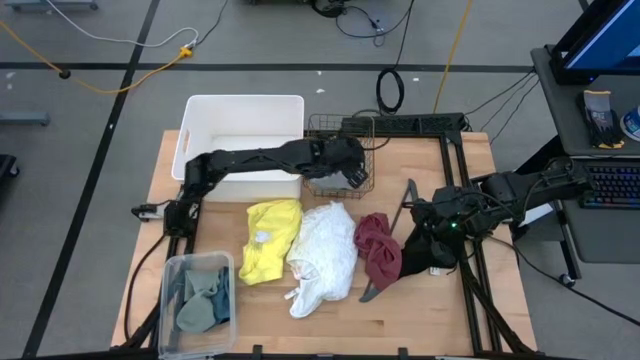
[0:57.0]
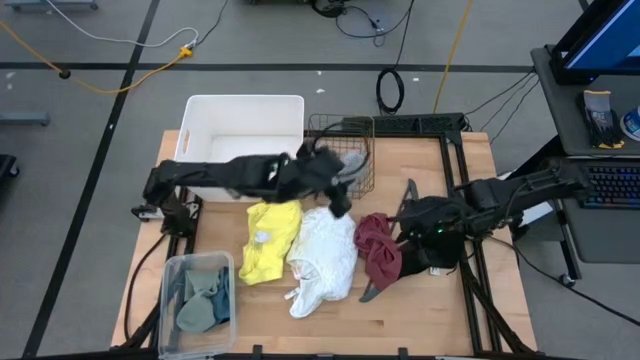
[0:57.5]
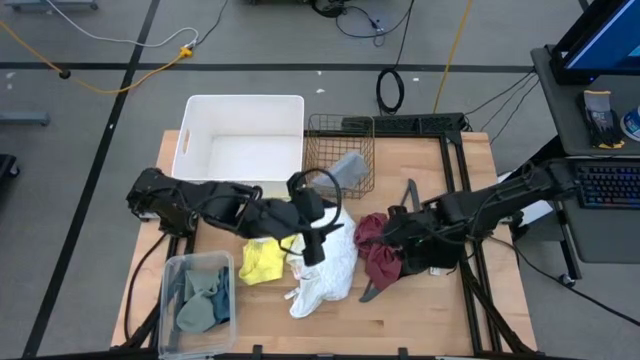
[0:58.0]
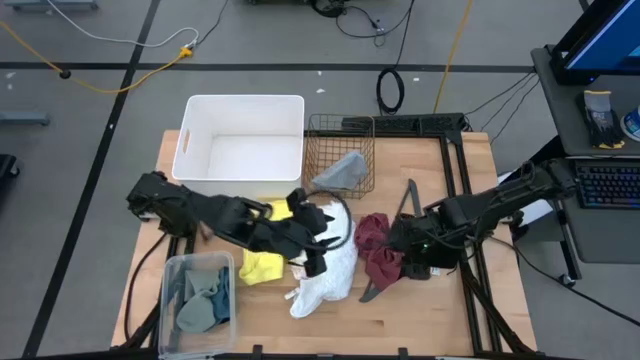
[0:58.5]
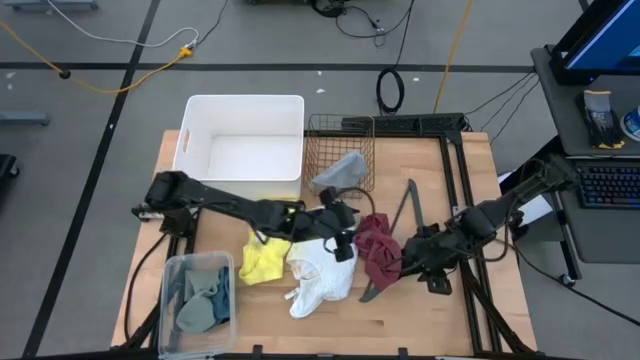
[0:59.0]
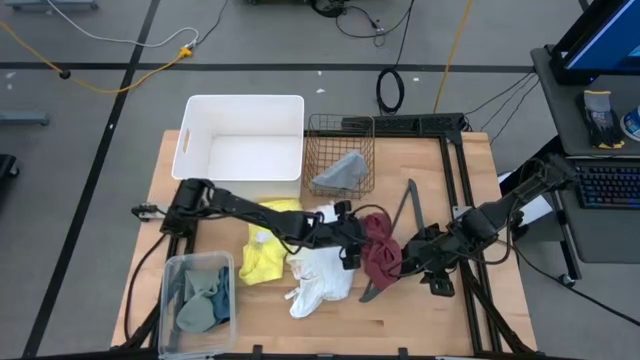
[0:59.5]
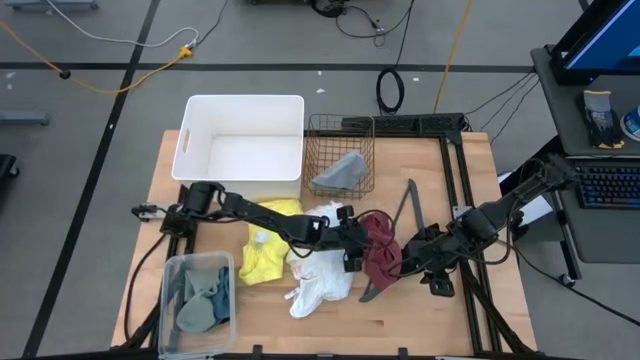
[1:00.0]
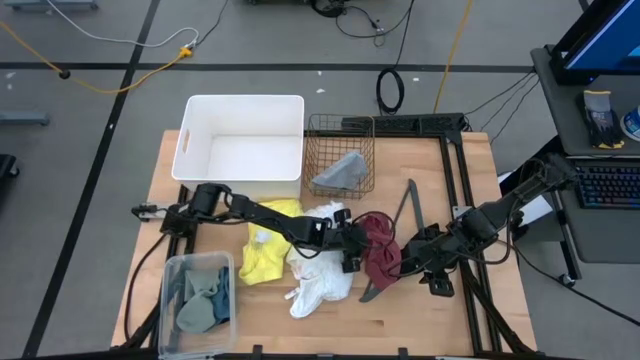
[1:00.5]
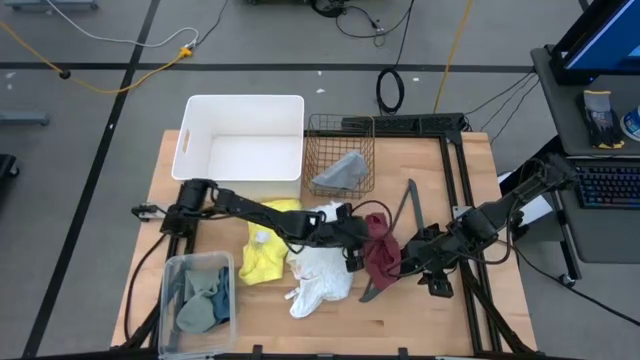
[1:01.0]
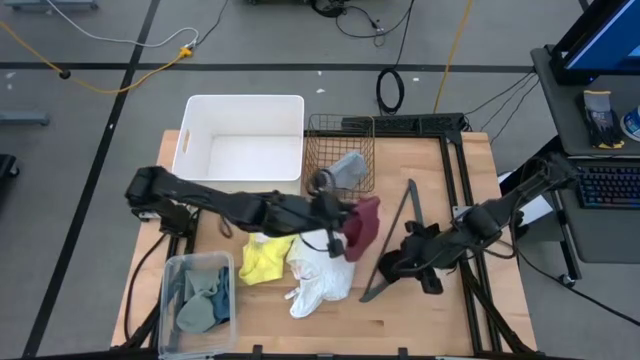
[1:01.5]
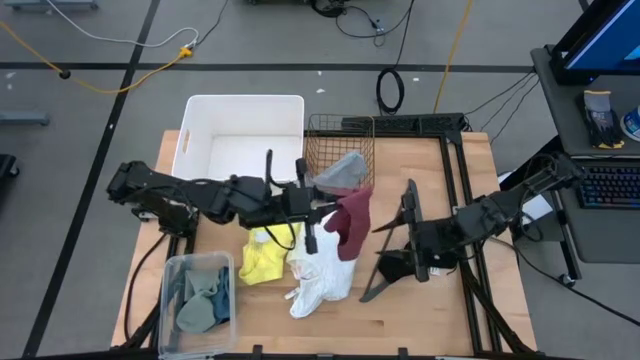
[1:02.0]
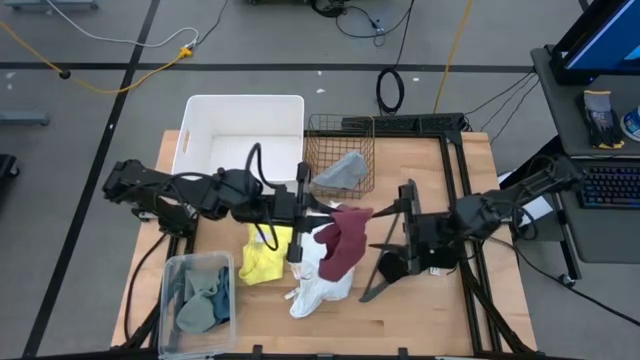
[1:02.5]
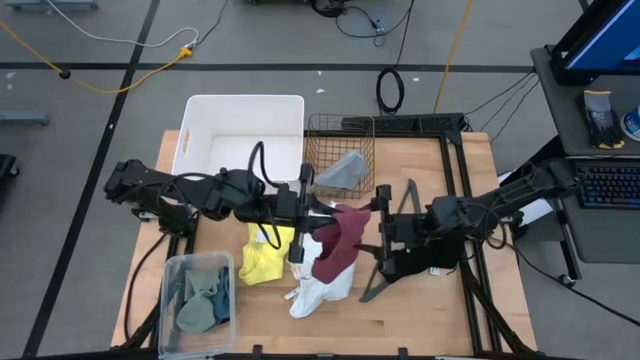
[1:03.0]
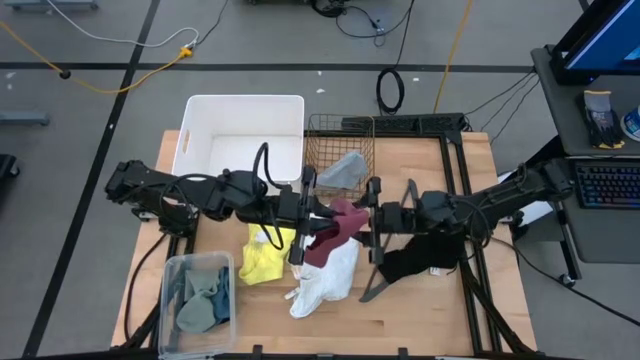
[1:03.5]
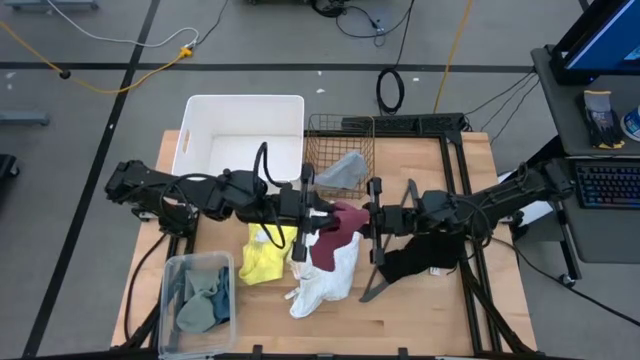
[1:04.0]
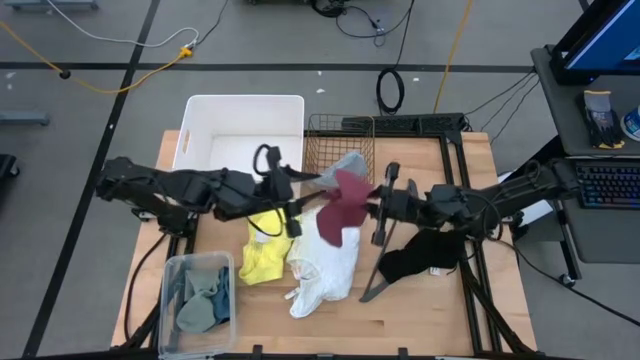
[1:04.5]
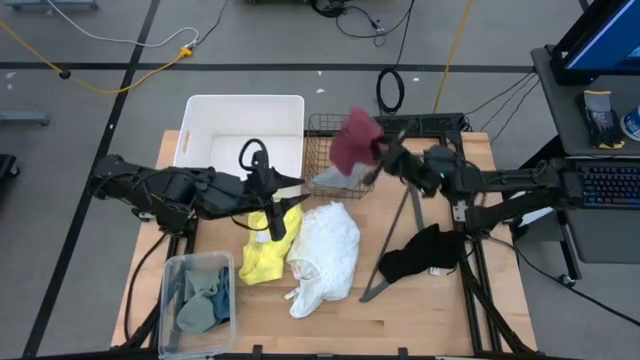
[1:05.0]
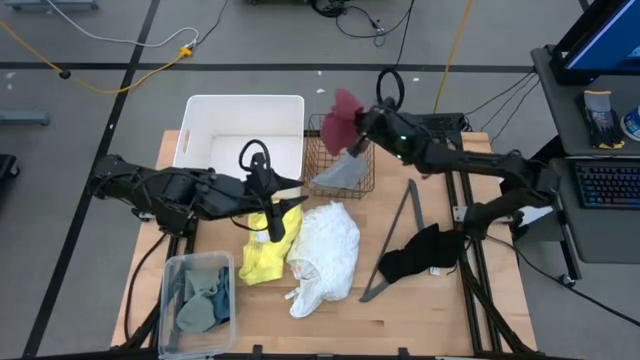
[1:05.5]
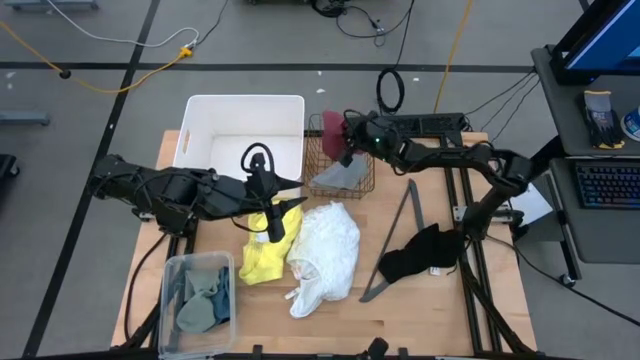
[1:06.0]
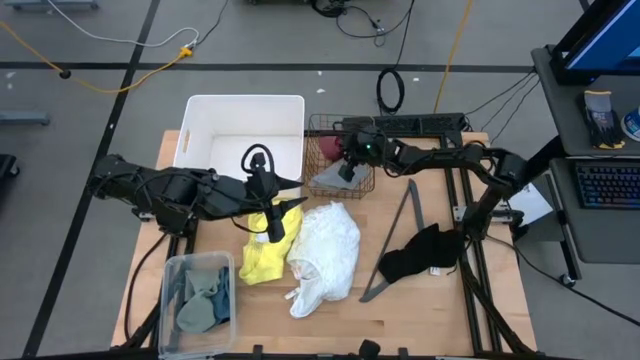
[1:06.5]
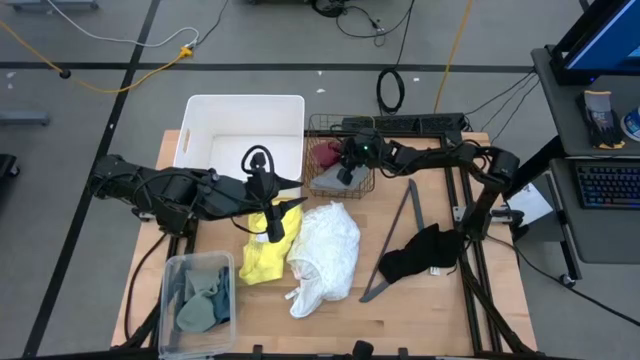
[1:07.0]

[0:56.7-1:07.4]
Task: Pick & Place Cloths
Put the pink boxer into the gold wire basket

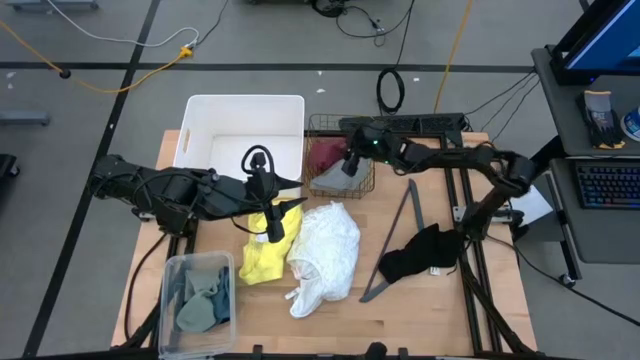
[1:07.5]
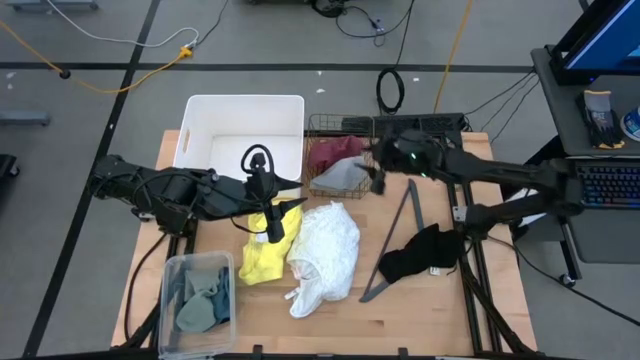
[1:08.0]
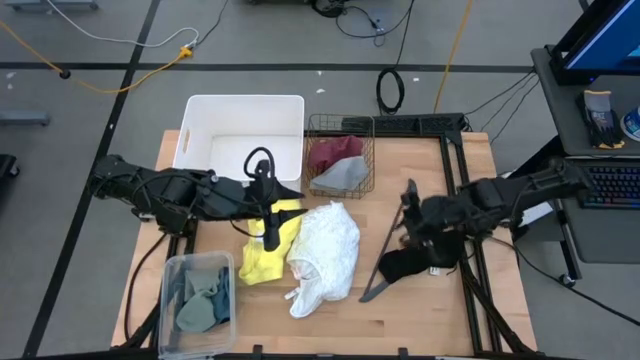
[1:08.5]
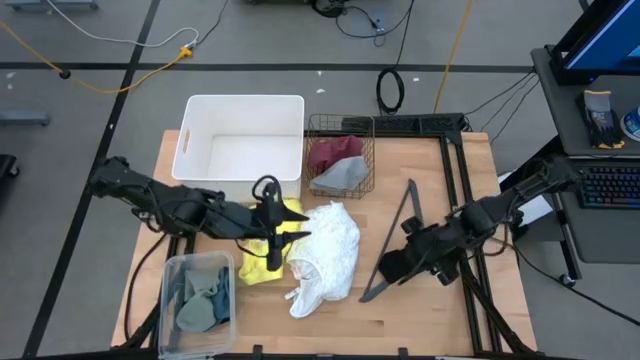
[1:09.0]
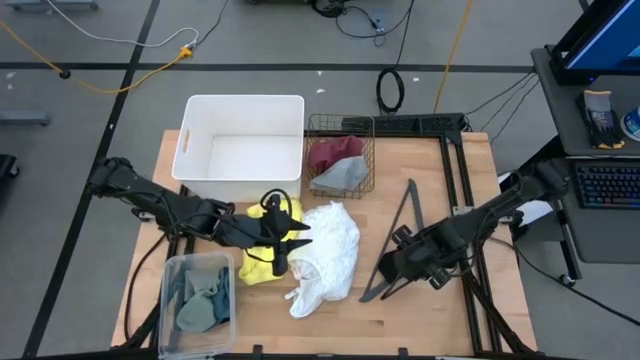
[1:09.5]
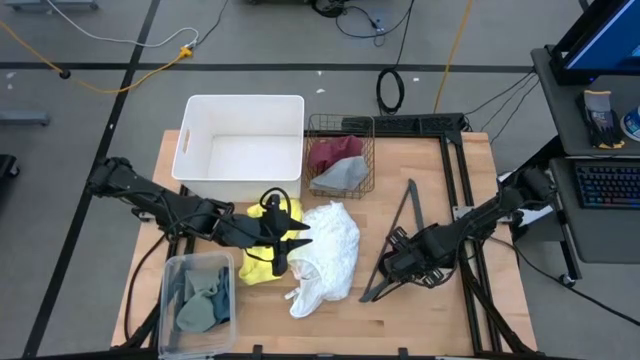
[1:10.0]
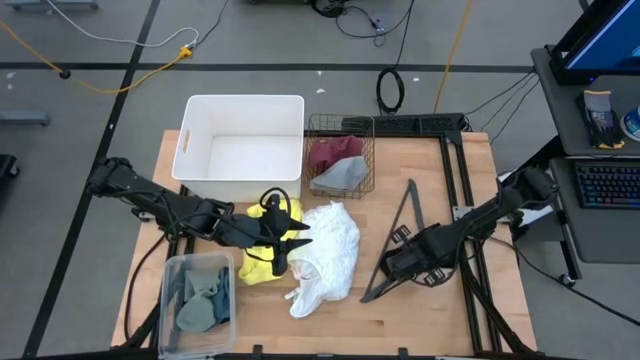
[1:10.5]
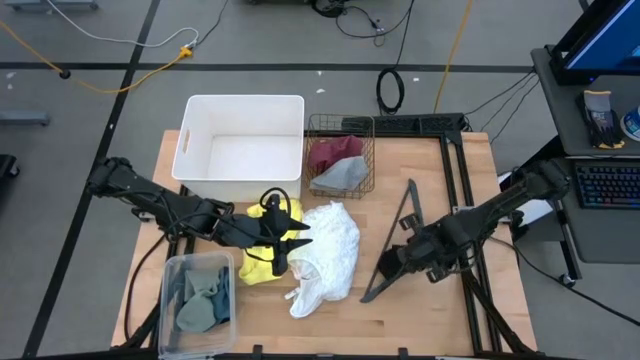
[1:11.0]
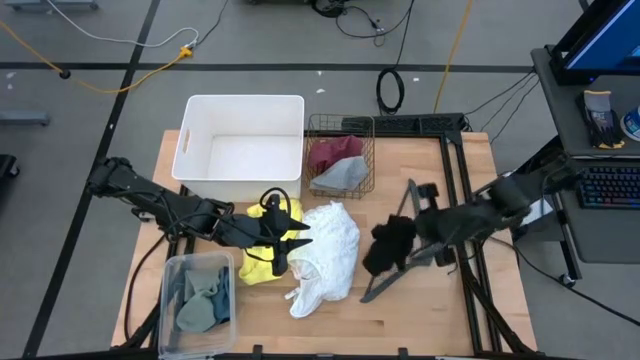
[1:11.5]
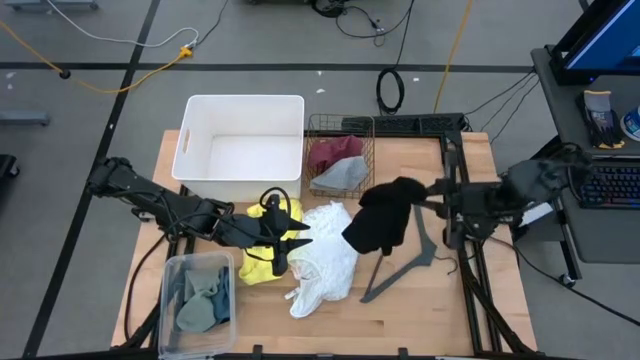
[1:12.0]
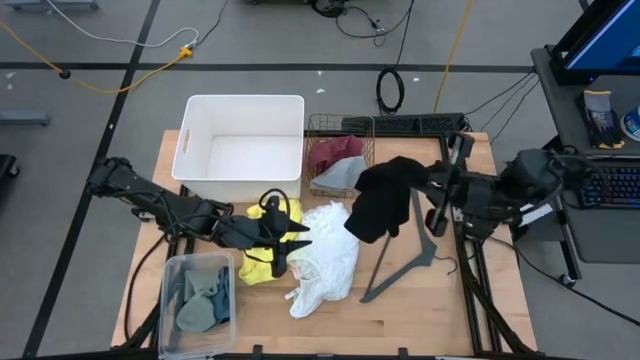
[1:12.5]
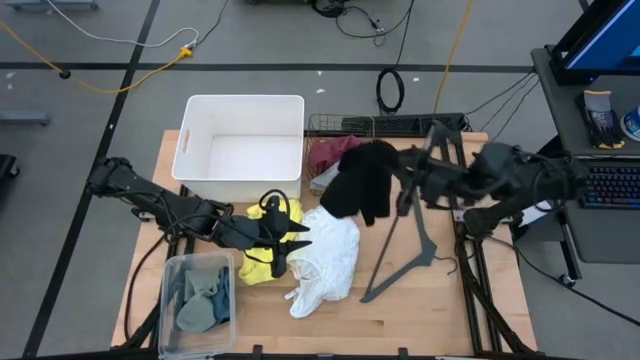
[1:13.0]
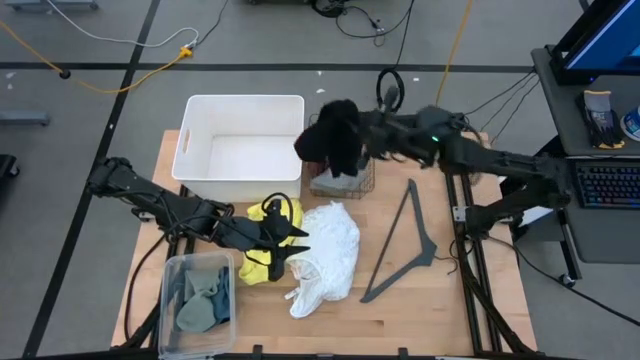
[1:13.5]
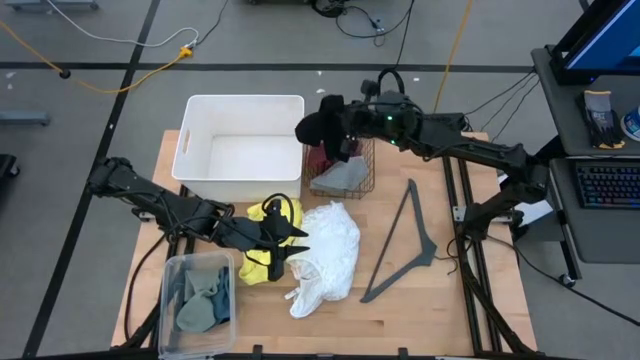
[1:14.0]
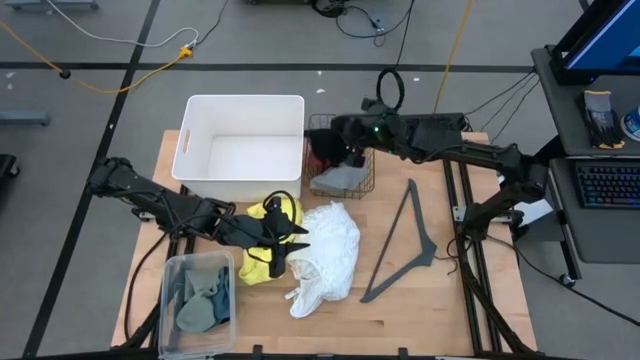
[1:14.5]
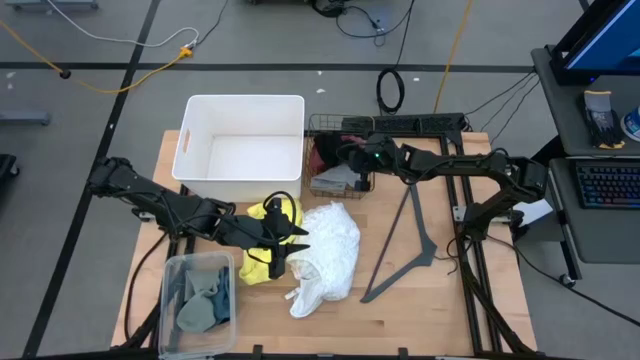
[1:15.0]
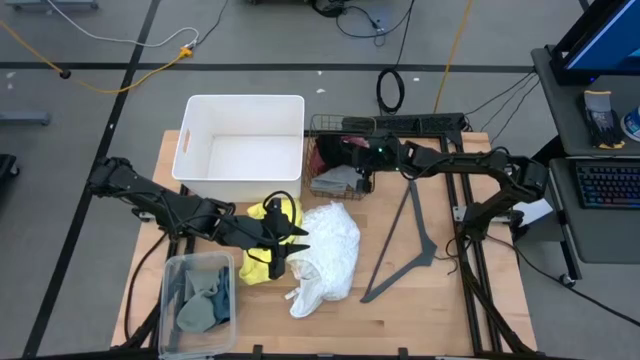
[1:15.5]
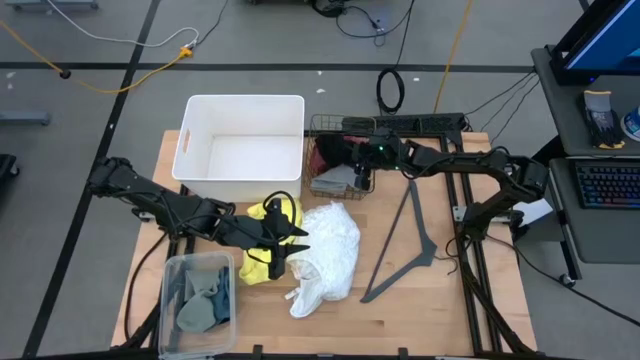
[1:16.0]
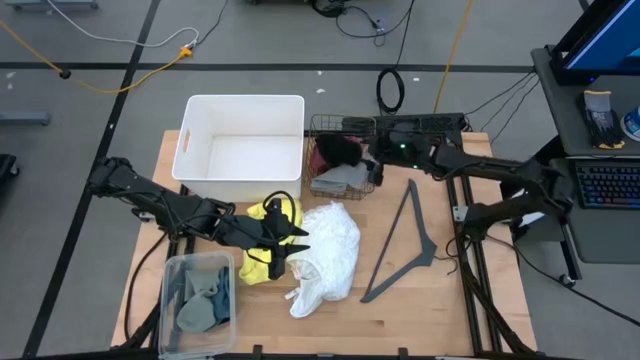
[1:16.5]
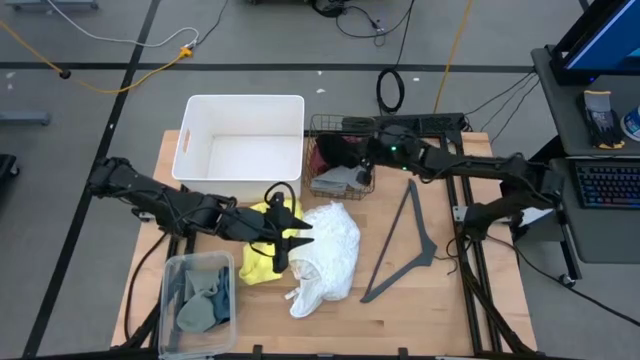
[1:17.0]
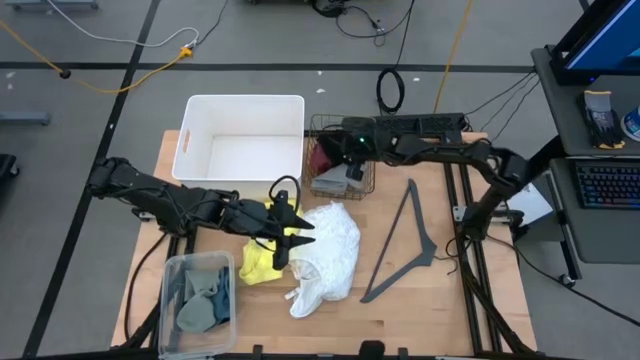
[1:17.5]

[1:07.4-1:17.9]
Put the black boxer into the gold wire basket

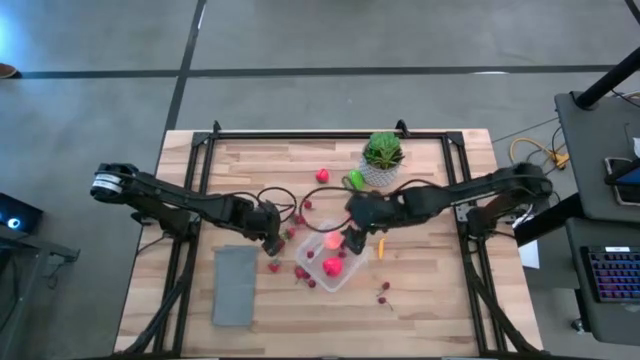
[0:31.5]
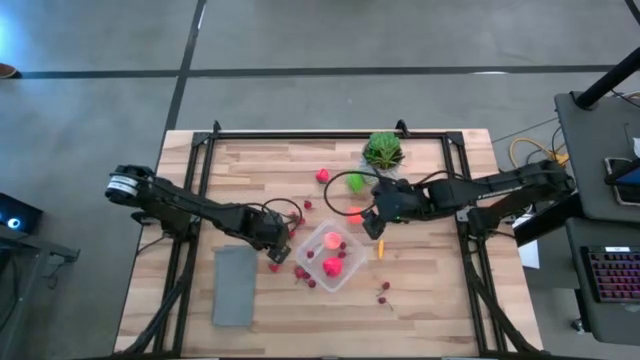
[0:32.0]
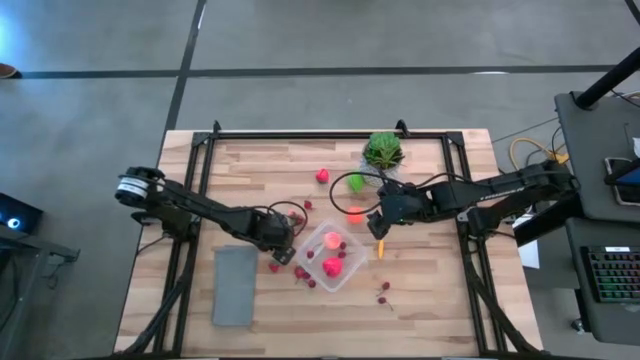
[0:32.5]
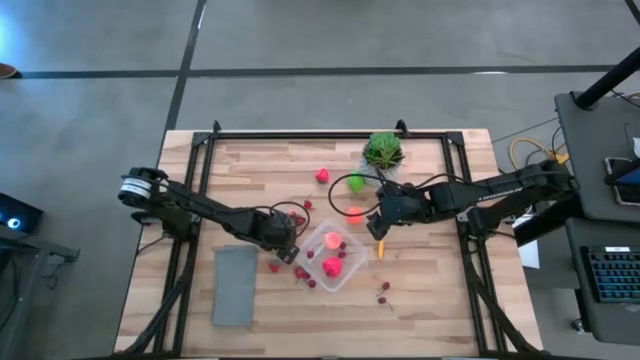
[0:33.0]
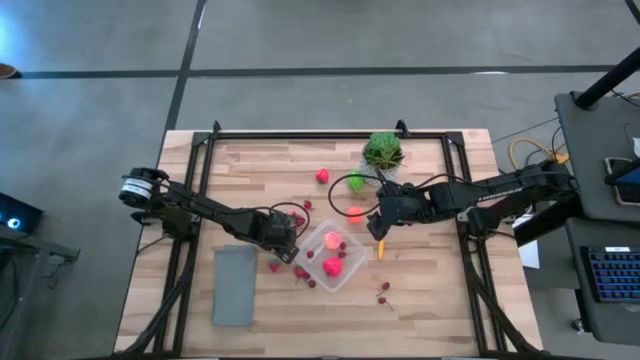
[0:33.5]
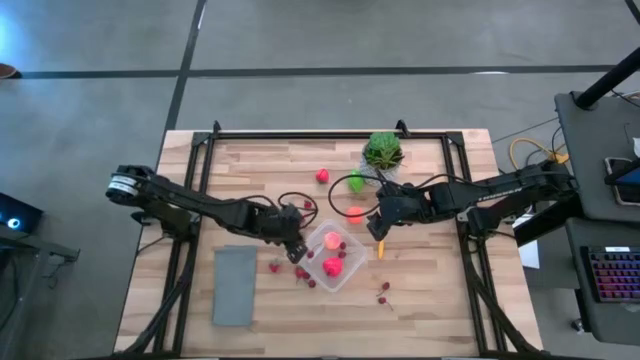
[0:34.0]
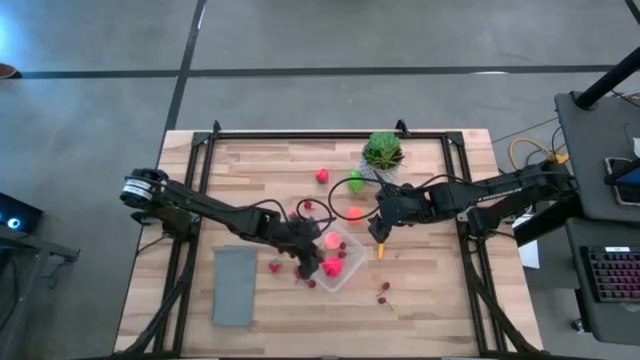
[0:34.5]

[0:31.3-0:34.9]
Task: Pick and placing Produce into tupperware
Put the red strawberry into the transparent bin
